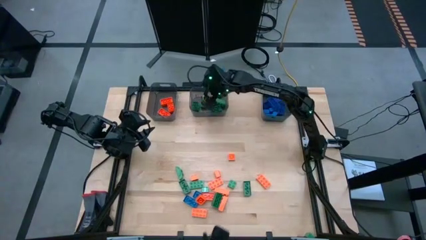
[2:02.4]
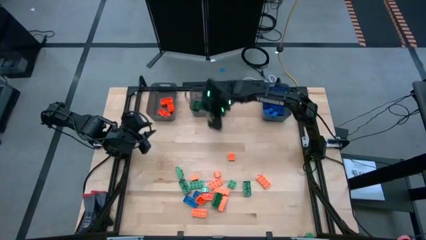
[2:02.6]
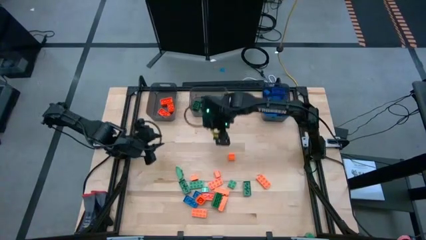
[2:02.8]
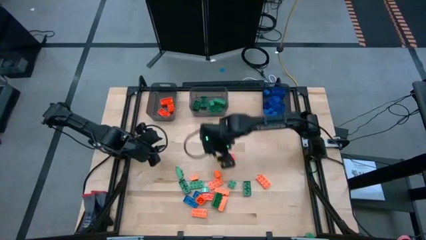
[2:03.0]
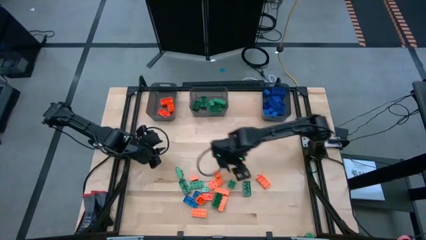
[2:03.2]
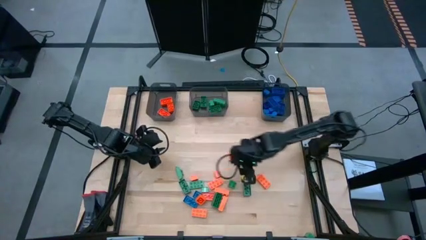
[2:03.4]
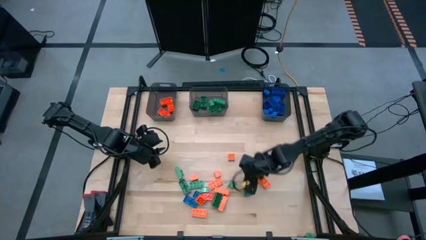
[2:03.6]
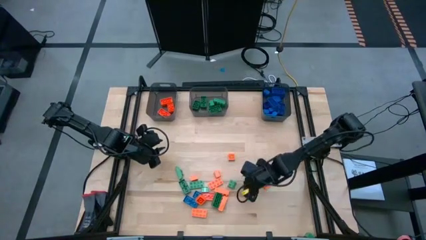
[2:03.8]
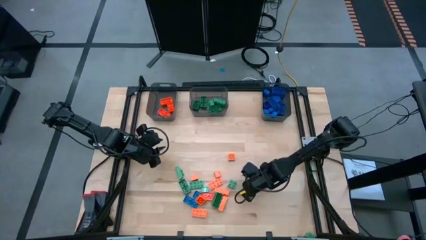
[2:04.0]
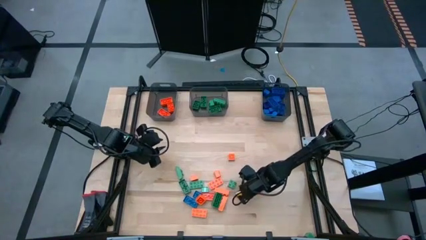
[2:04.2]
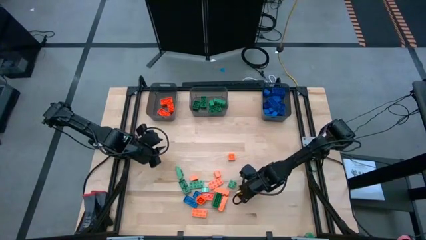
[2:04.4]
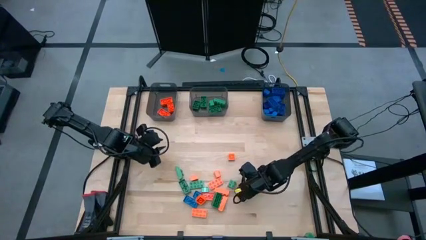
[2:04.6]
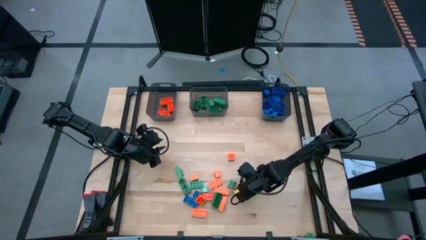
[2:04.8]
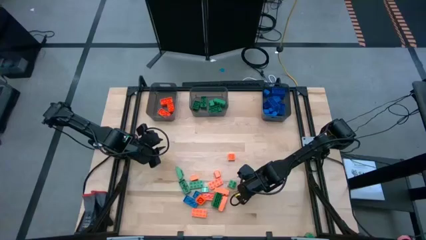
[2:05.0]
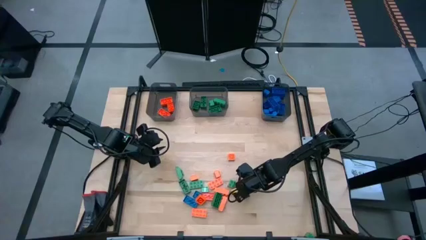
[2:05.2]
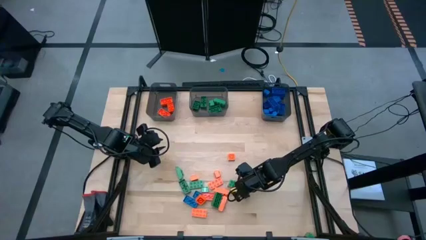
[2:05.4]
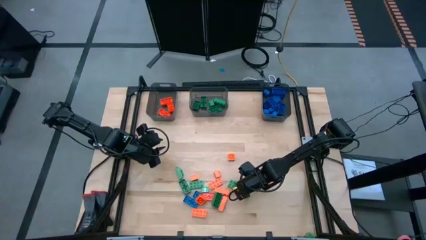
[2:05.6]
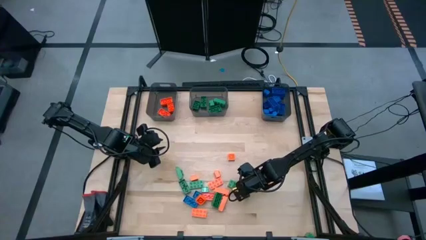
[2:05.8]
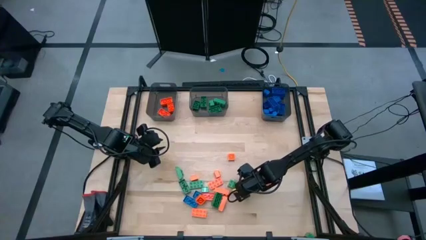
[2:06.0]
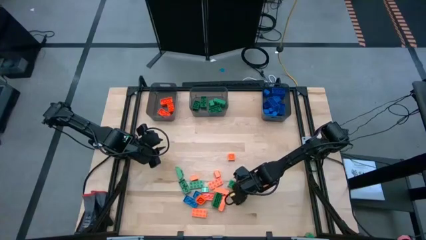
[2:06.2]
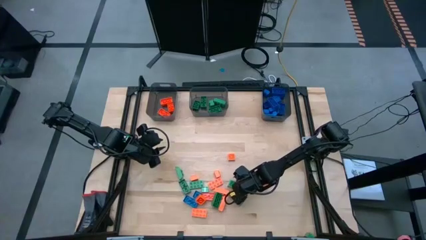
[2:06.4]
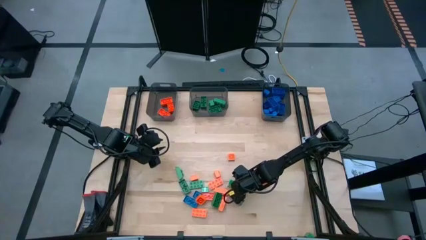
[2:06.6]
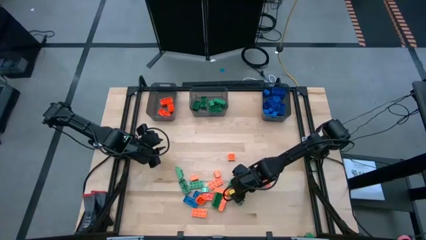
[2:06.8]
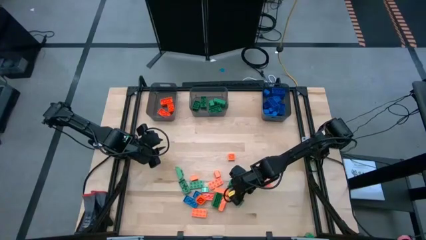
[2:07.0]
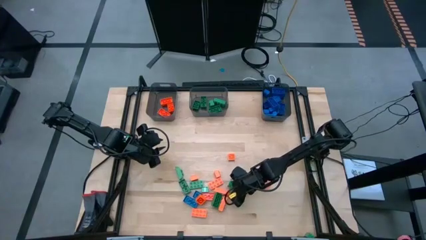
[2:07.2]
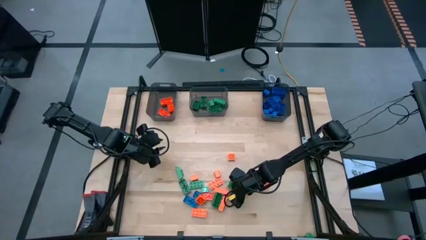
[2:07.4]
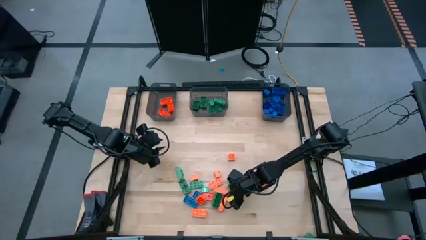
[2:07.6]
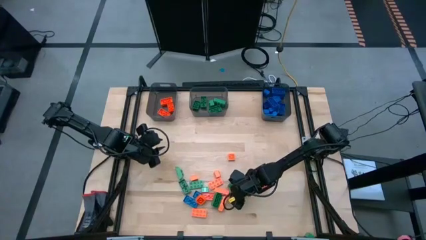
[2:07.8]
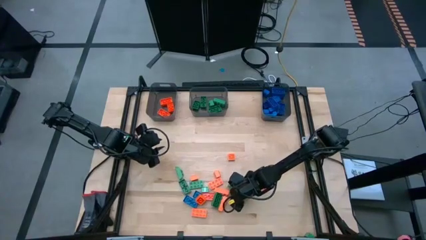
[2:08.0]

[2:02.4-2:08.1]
Task: Sort blocks
Put the green piece into the middle black bin

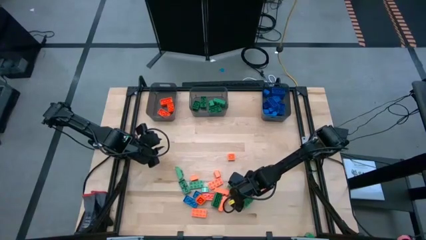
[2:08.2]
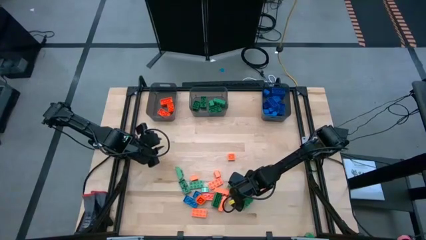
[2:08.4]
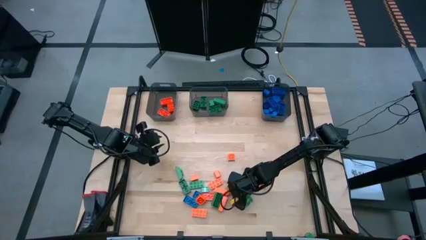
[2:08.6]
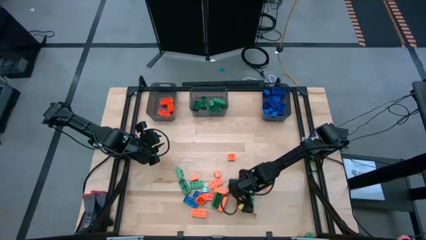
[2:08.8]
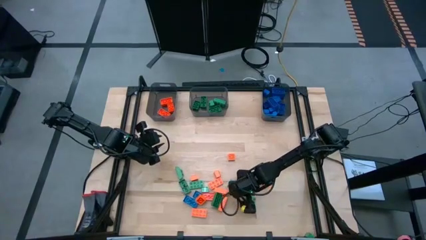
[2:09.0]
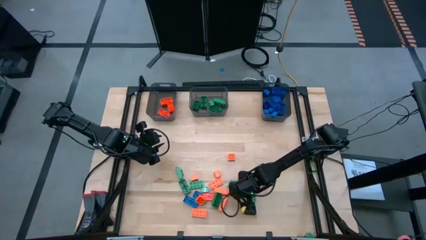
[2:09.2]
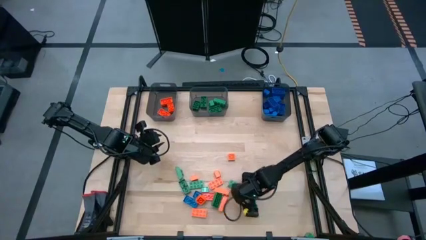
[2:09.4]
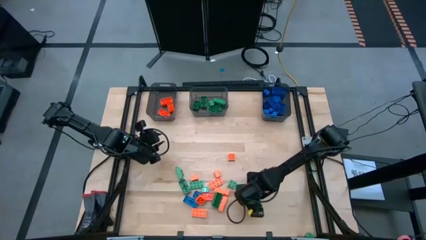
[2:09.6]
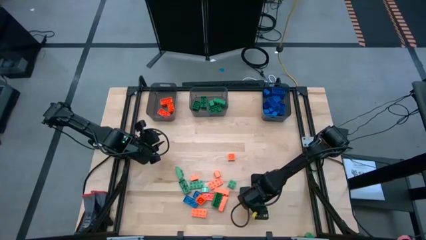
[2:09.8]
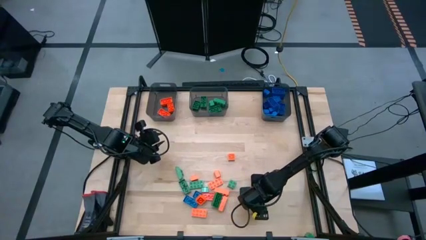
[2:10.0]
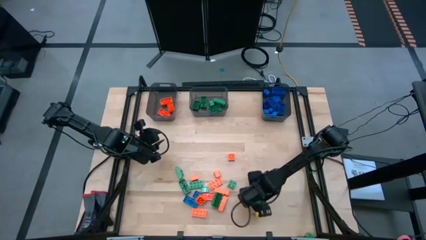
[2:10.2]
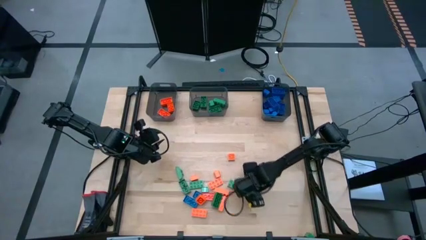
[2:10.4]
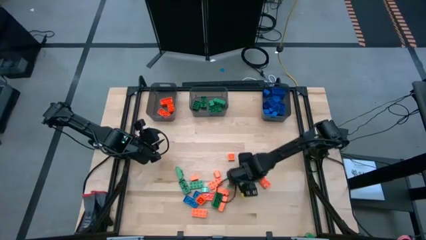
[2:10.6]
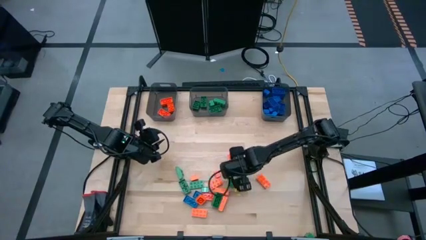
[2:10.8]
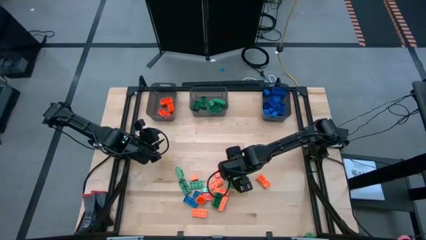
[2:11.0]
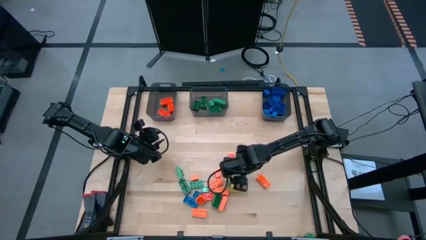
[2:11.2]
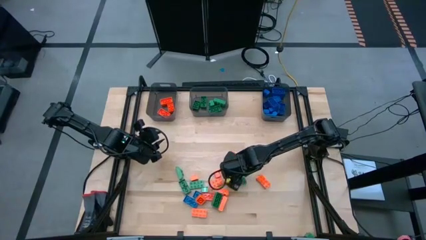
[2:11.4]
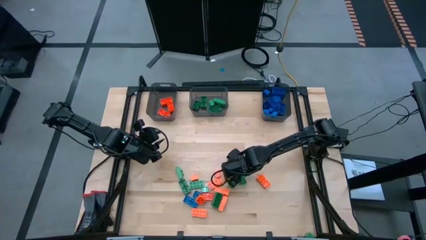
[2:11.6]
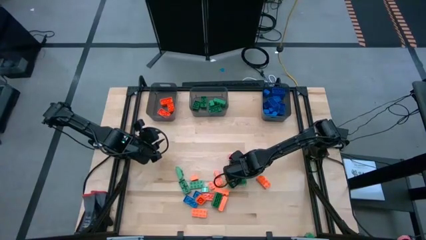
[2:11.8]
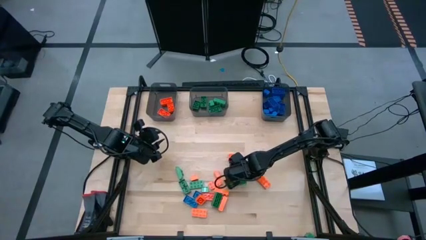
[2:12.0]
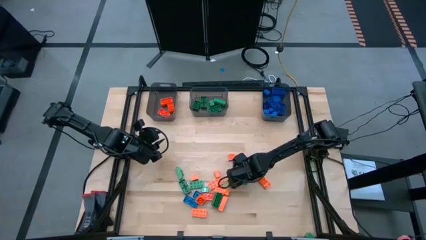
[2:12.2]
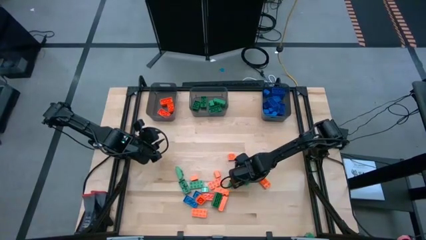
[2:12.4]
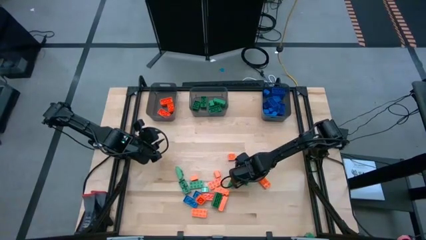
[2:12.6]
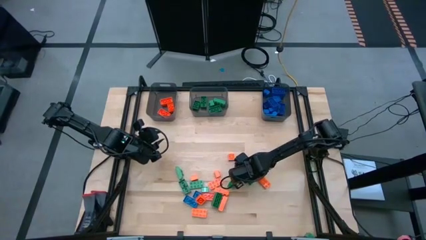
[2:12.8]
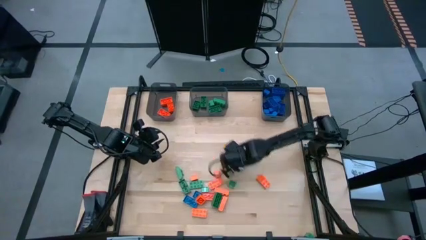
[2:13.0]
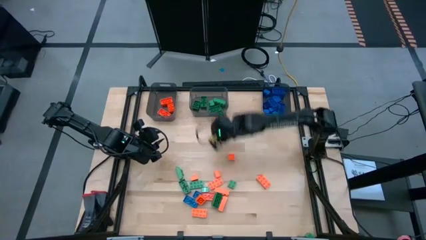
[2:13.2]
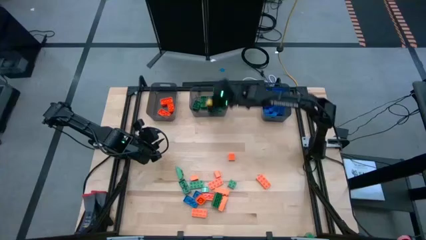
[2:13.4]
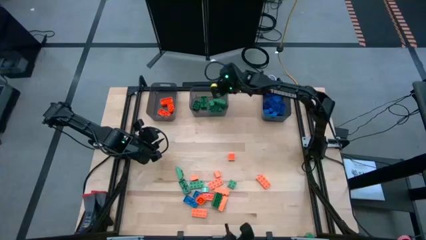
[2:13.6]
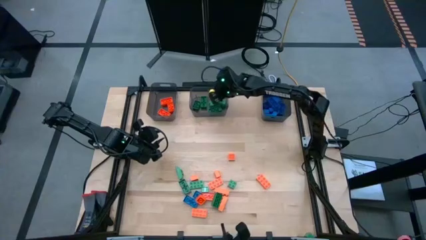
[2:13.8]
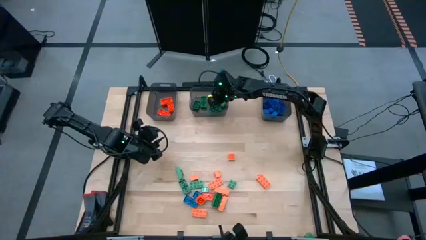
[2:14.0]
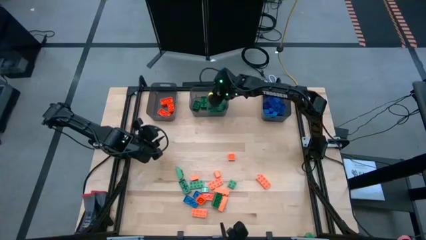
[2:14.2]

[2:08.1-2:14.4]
Put the green piece into the middle black bin

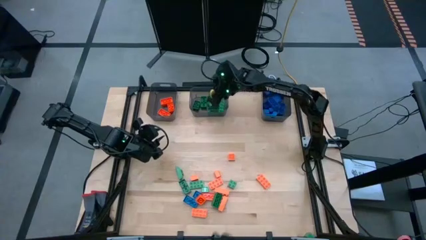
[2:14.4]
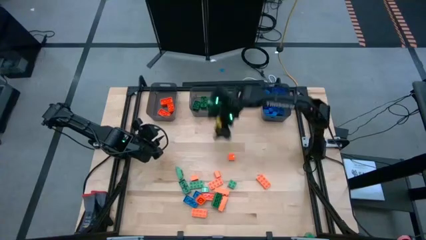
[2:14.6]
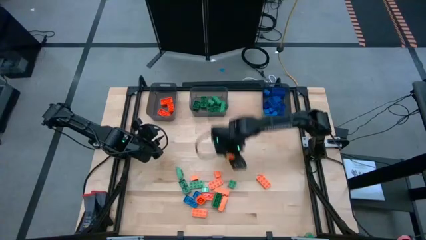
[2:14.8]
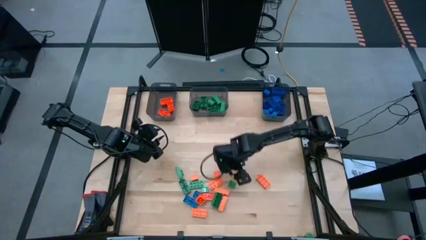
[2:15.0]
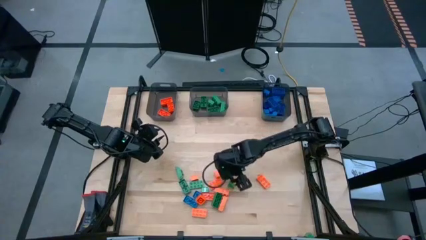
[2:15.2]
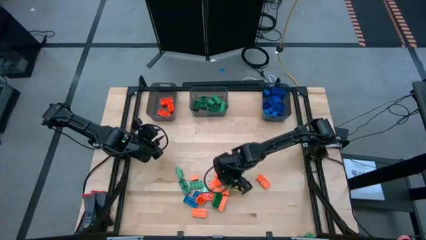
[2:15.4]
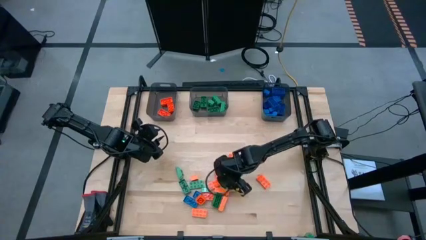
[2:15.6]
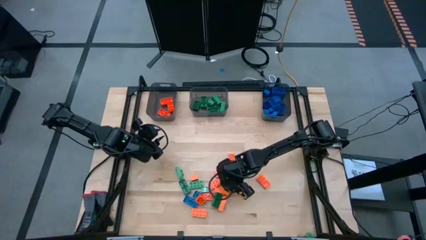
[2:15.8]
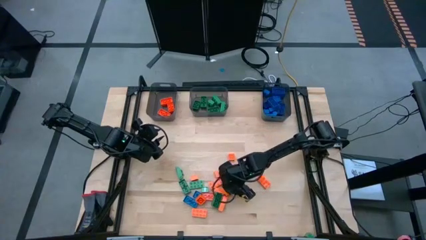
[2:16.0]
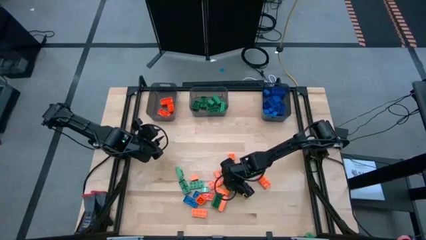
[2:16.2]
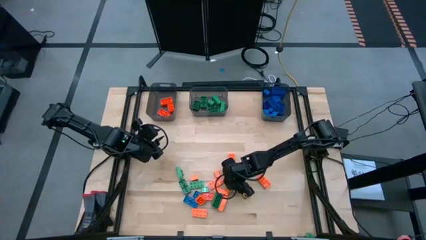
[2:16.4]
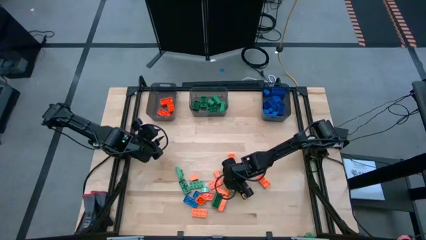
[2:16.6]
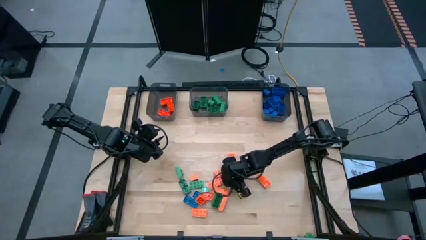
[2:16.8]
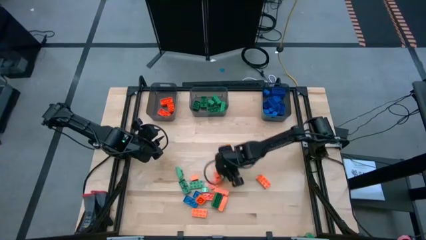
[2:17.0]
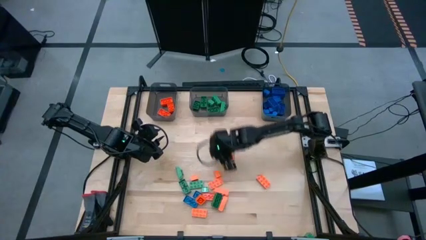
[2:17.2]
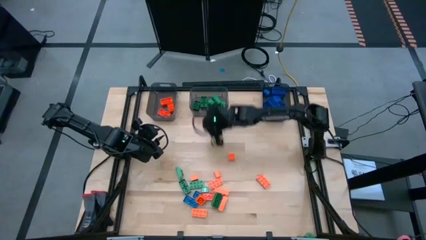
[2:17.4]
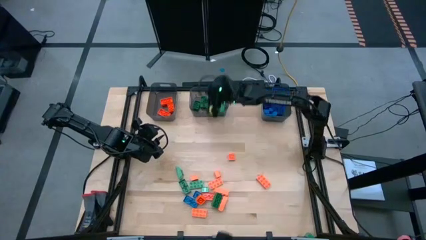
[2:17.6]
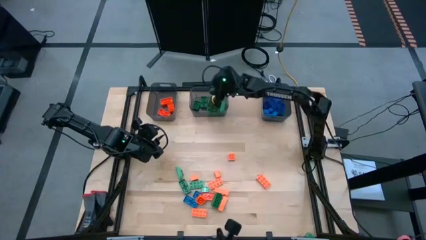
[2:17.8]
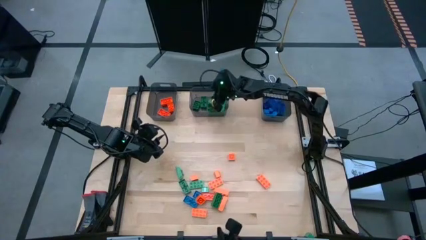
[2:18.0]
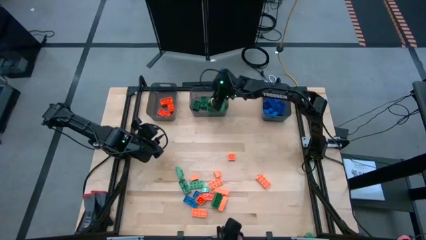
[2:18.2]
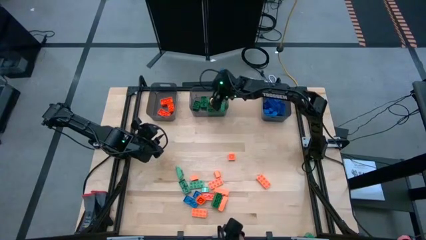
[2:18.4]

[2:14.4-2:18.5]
Put the green piece into the middle black bin
